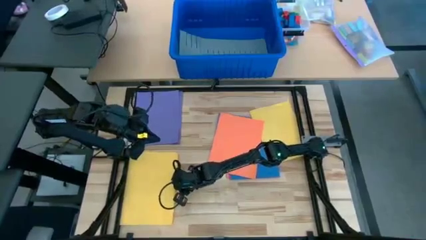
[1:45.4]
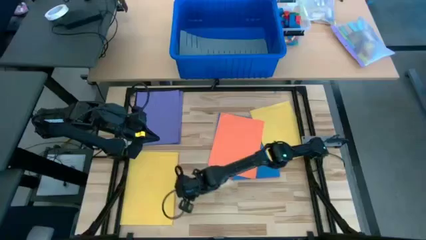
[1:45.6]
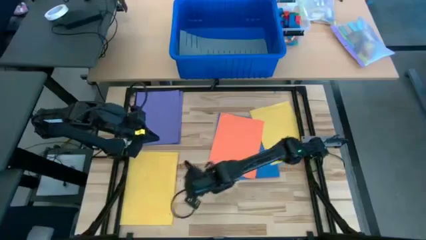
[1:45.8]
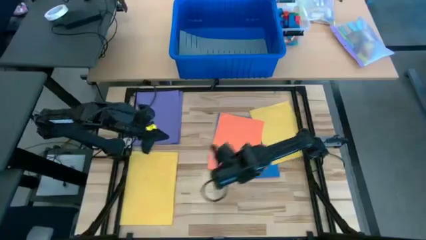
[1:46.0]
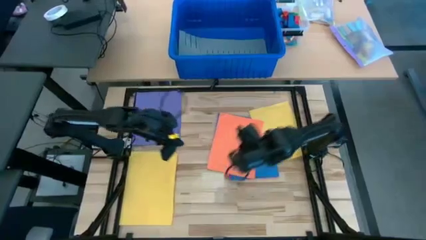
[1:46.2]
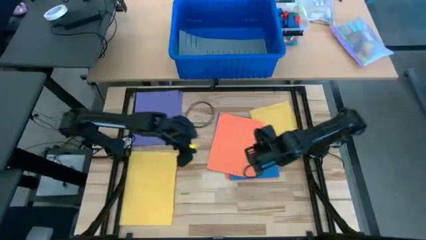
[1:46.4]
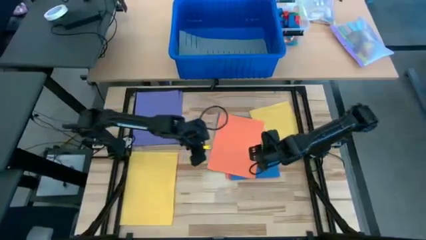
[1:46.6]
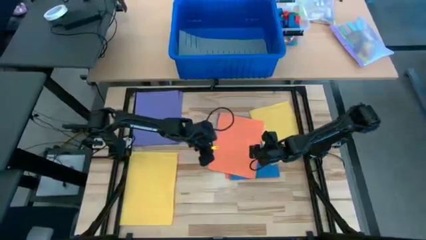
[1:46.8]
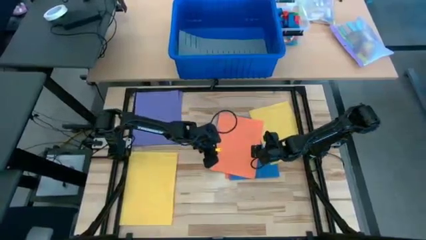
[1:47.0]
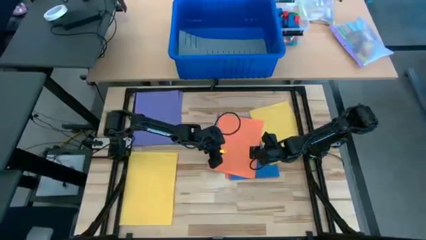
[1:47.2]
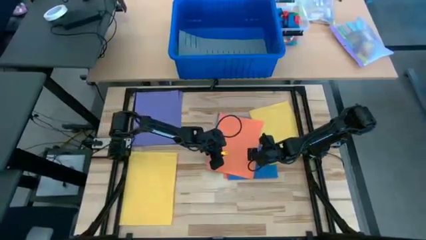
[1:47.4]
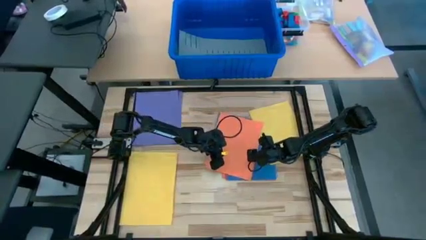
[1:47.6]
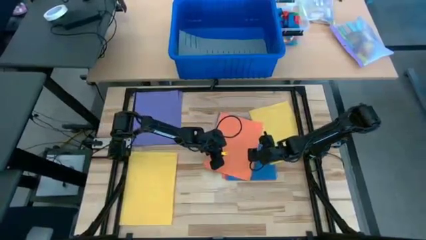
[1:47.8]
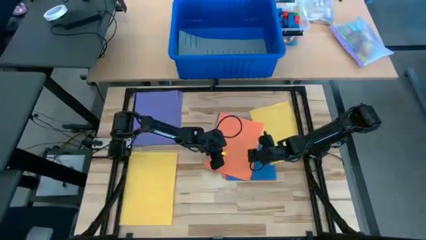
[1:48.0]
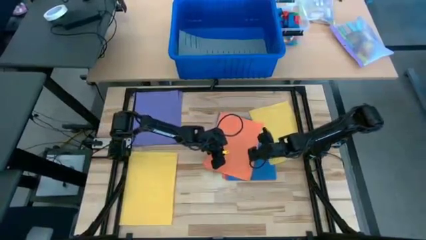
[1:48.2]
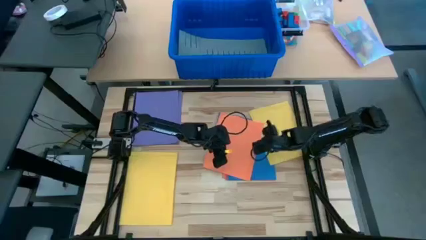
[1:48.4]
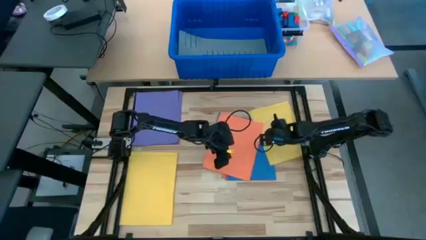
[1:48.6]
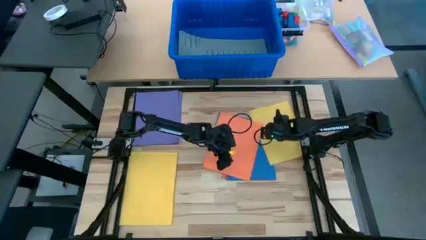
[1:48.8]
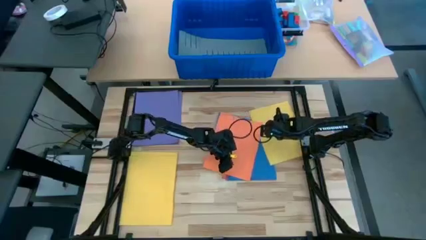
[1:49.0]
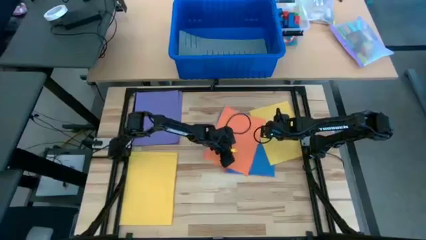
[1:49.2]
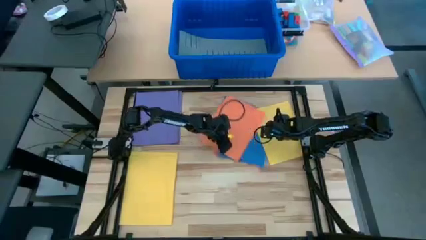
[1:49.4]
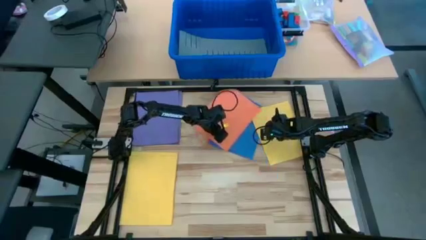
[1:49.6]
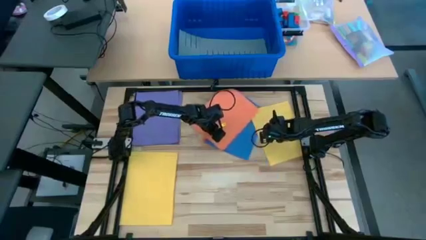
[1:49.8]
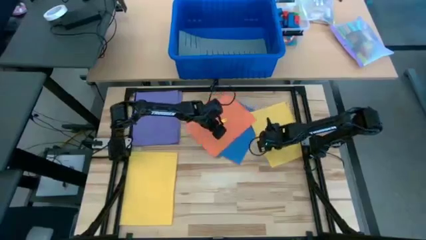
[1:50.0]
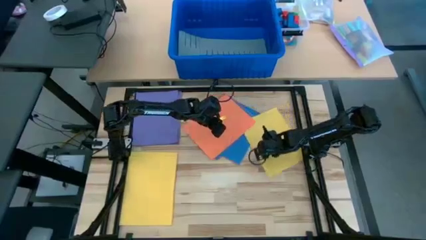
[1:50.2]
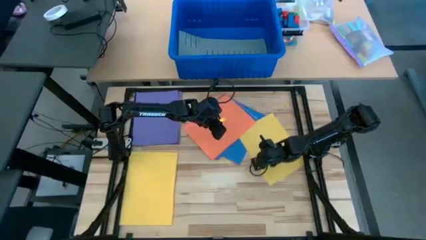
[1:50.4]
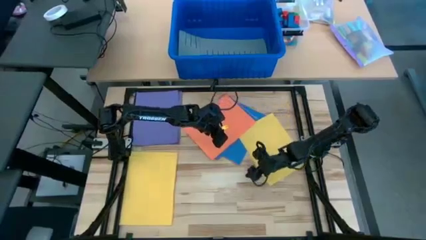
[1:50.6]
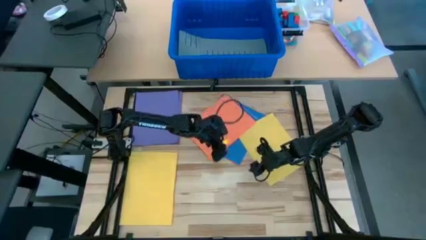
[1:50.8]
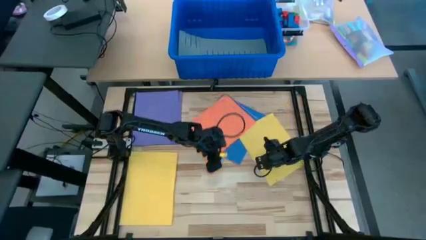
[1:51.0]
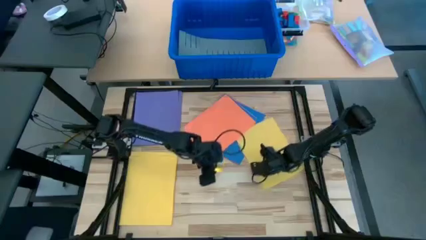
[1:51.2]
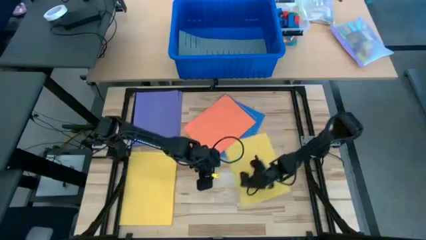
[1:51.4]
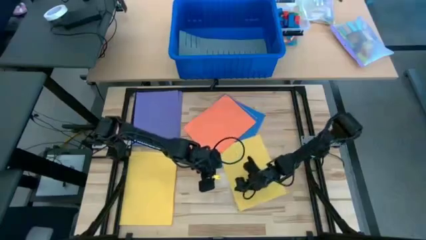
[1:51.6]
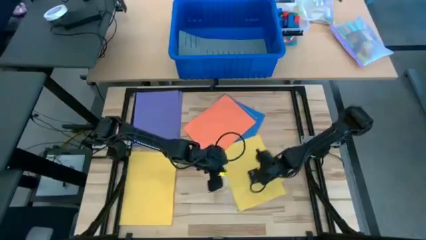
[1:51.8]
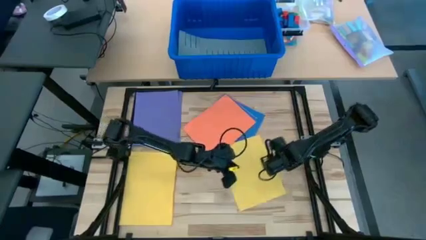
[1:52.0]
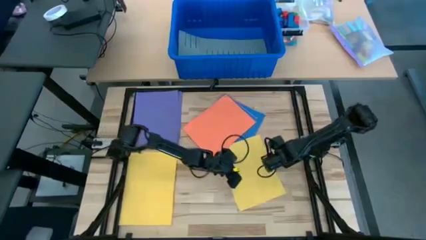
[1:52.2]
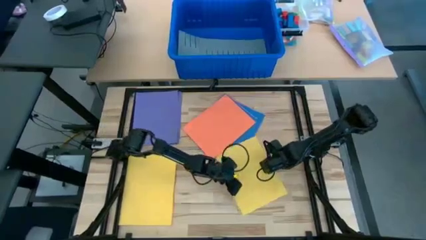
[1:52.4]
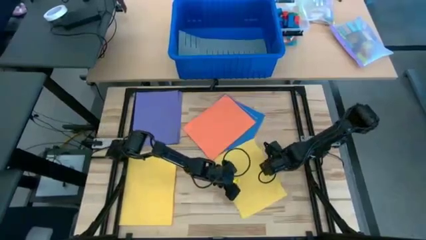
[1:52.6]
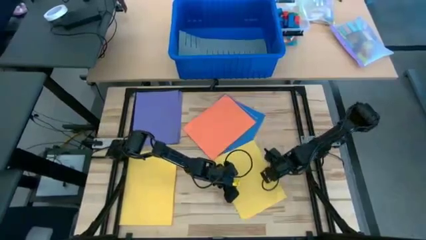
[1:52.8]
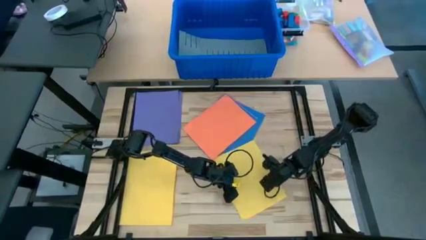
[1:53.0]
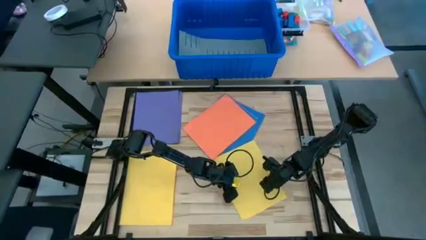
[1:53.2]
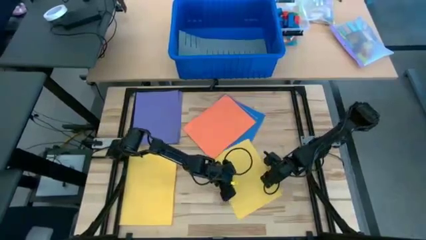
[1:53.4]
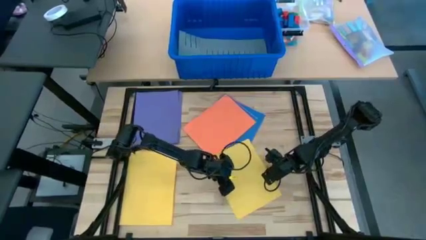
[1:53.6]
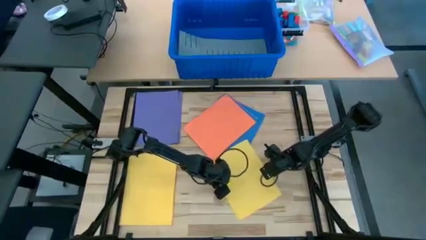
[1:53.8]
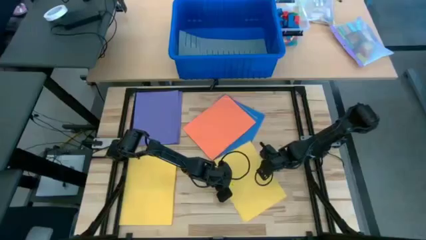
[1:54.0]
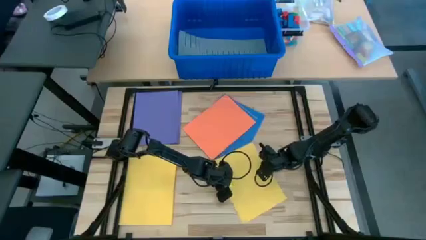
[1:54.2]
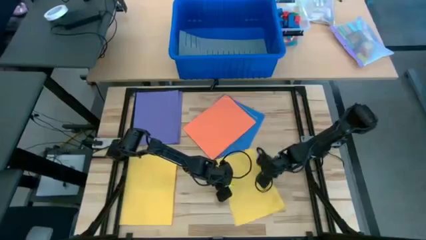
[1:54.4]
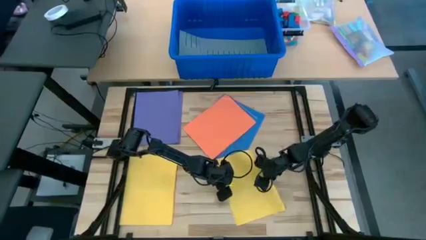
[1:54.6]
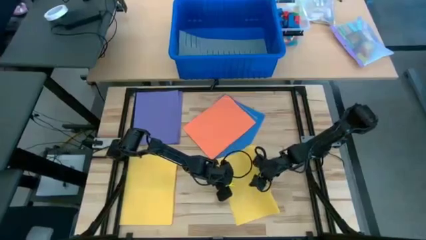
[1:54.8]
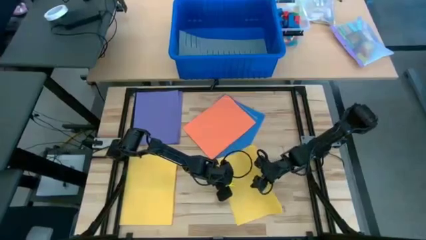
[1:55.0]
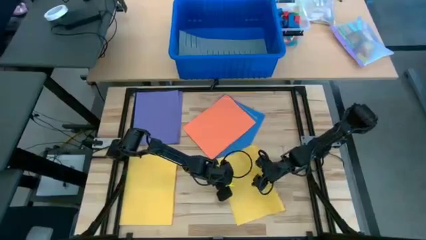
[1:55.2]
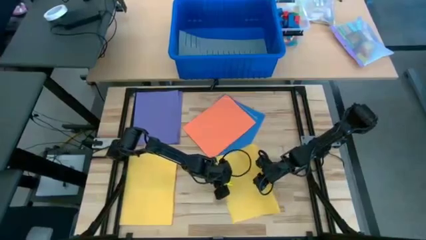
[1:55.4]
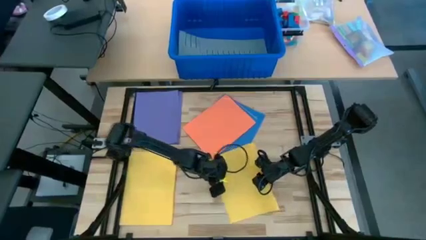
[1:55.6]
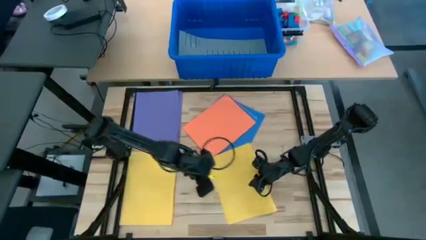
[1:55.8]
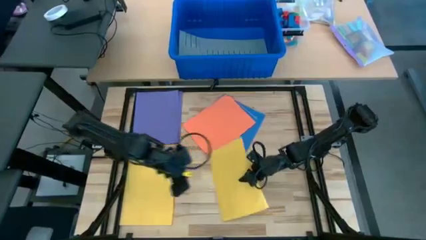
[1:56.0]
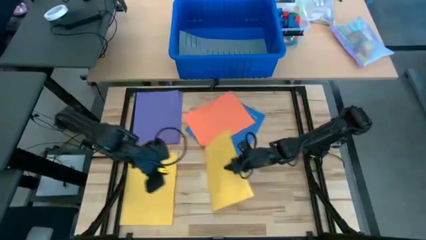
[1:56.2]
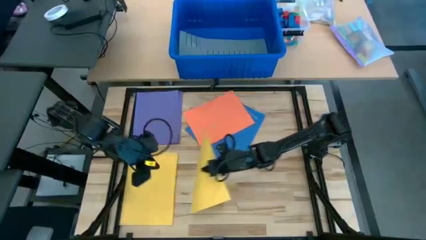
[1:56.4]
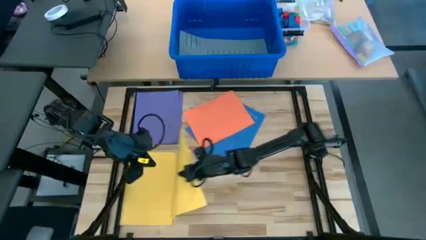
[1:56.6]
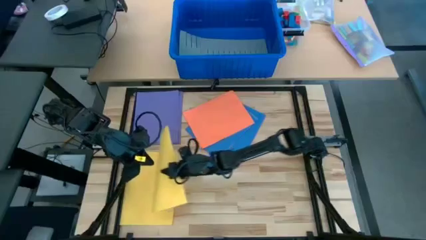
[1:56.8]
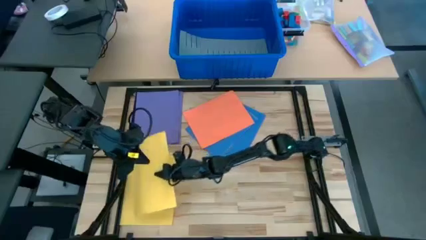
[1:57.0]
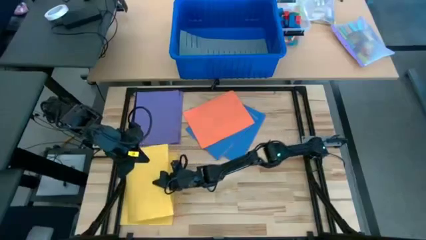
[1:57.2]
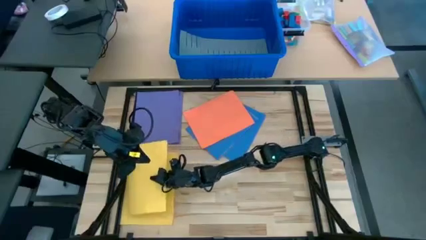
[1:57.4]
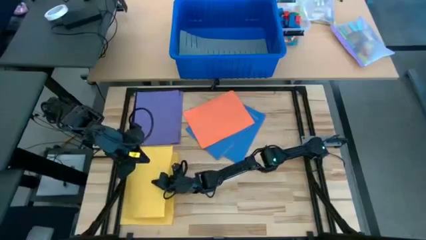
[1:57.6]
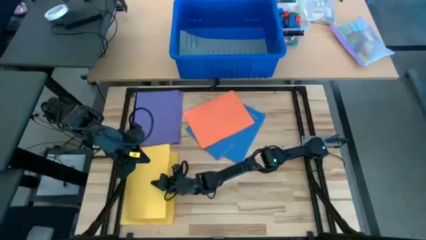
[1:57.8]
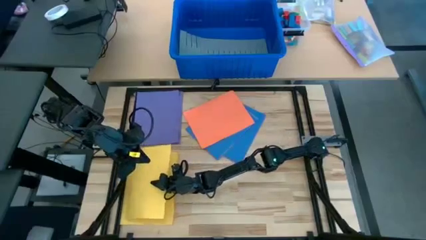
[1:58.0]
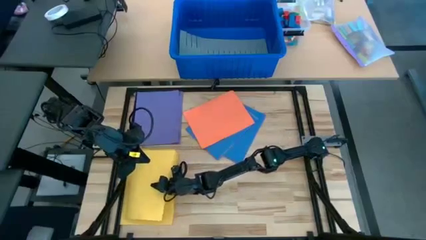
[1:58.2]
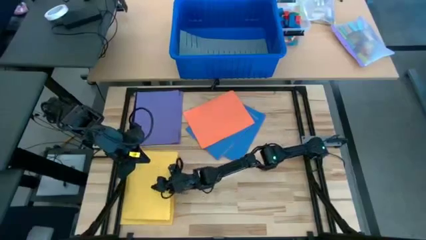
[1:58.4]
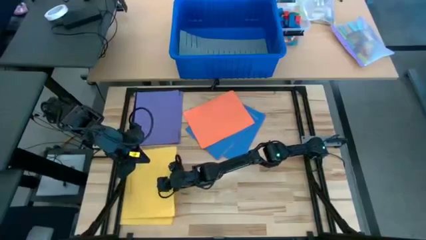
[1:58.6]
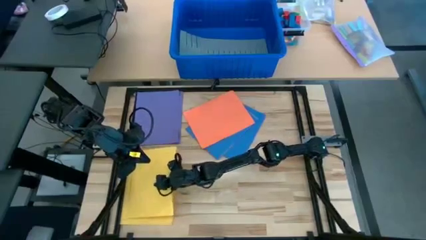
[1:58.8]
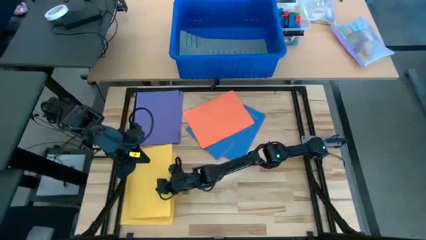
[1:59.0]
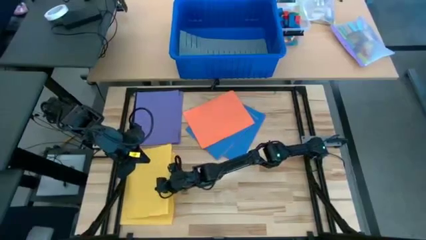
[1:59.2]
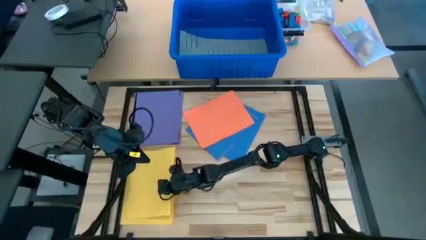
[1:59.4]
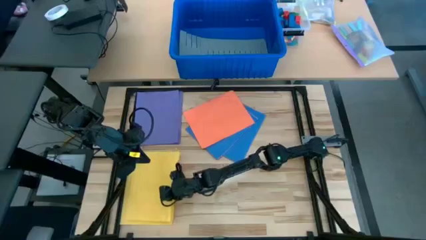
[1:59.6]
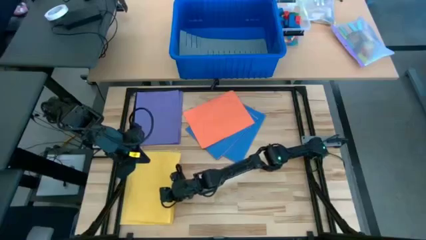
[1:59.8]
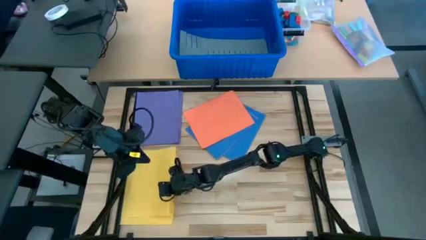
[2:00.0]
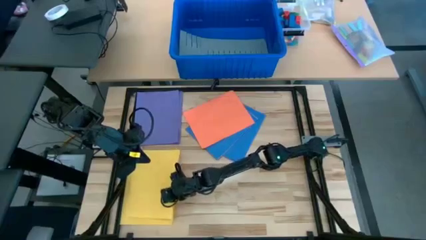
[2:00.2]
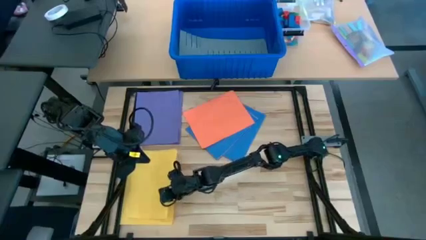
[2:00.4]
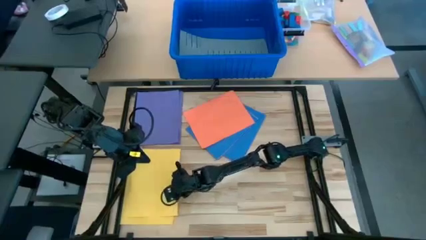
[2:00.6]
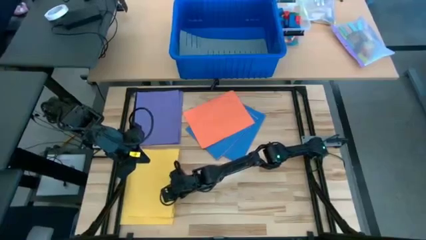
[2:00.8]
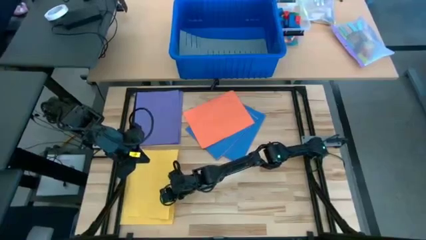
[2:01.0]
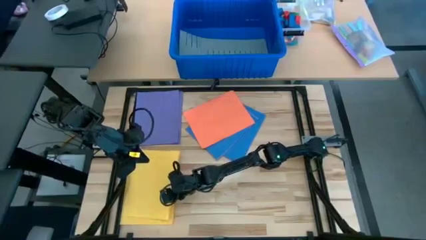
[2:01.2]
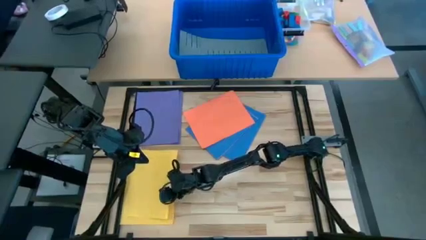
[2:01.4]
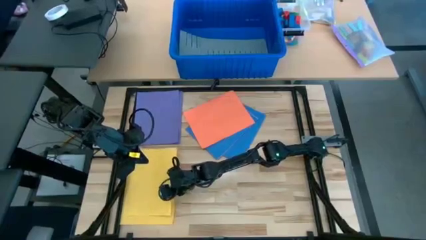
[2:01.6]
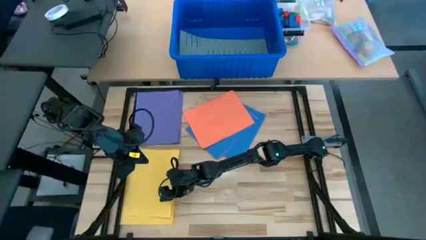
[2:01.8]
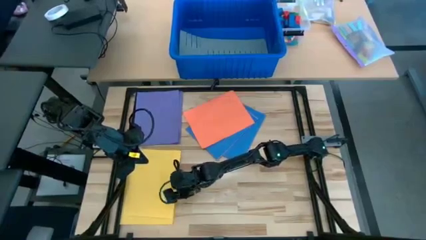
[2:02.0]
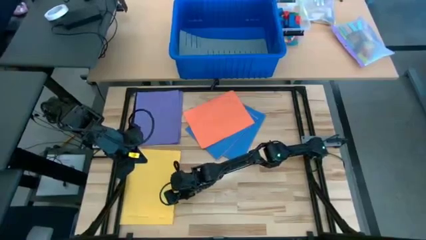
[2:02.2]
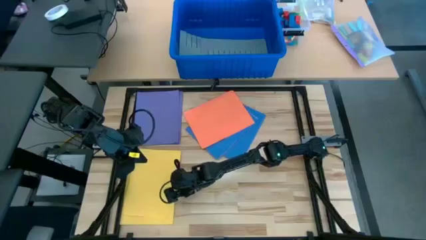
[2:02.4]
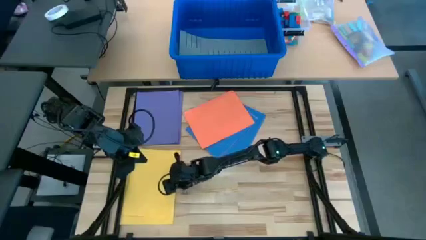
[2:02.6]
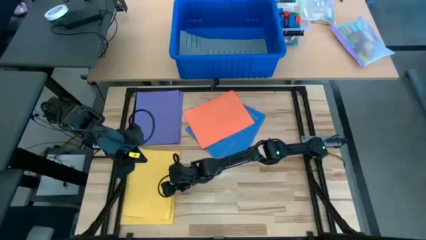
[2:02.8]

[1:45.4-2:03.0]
Task: Organize paper
Stack the yellow colored paper on top of the other yellow colored papers
